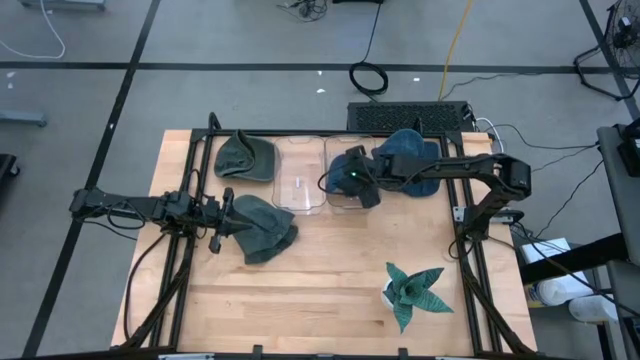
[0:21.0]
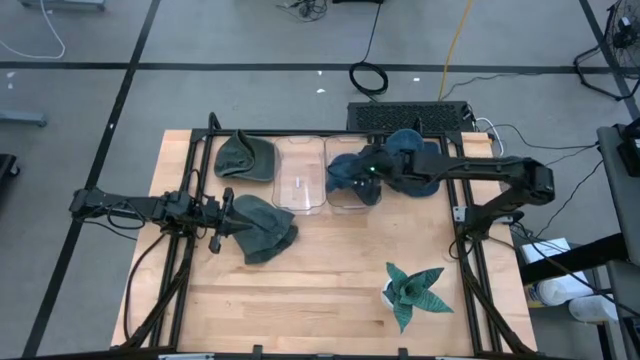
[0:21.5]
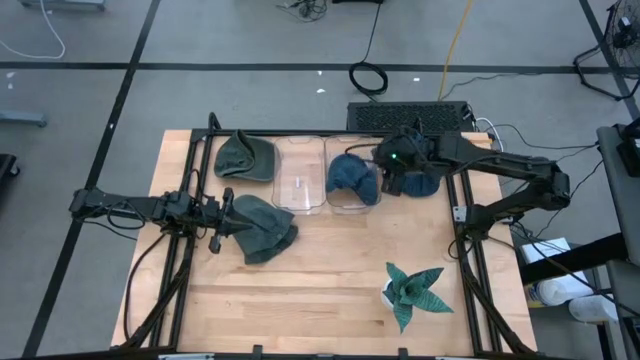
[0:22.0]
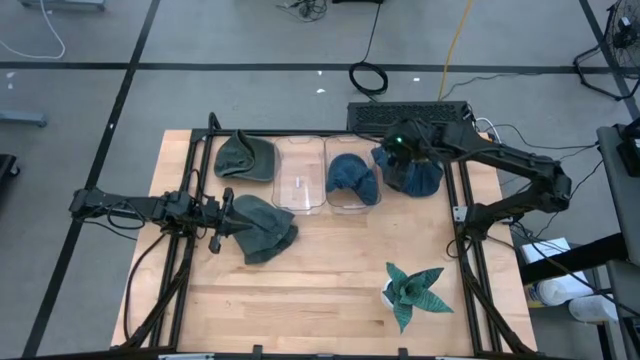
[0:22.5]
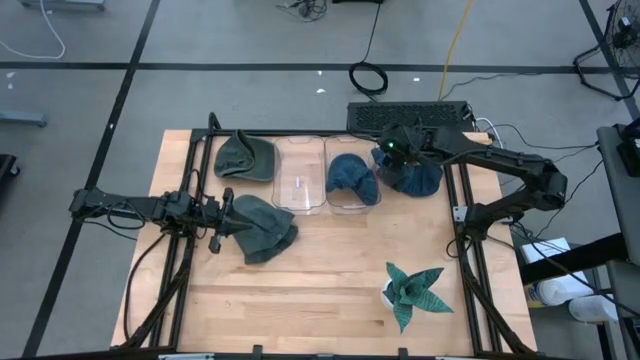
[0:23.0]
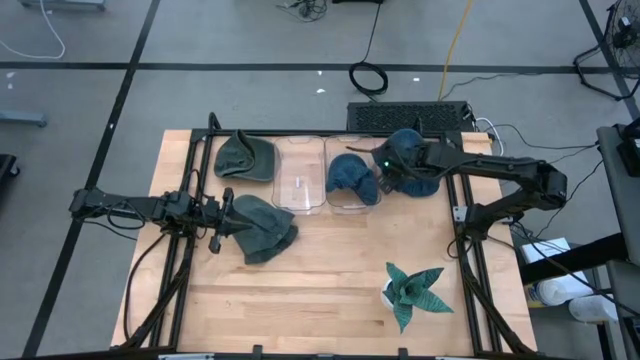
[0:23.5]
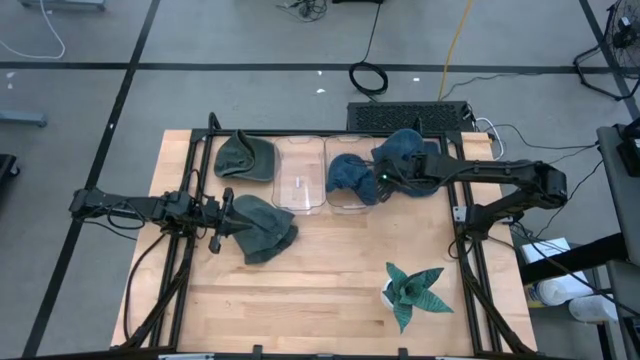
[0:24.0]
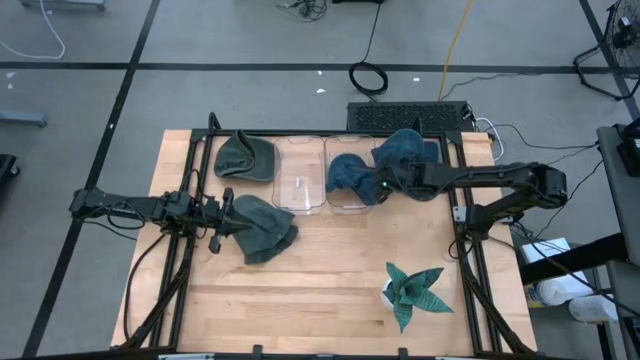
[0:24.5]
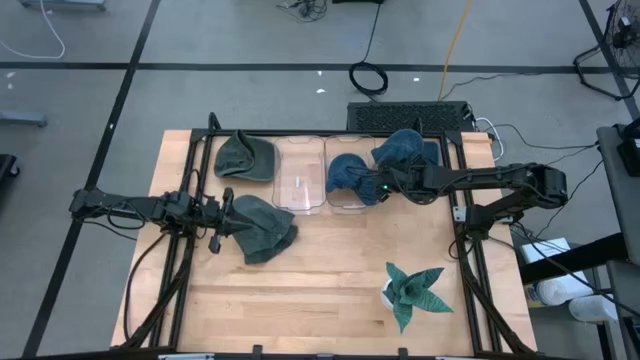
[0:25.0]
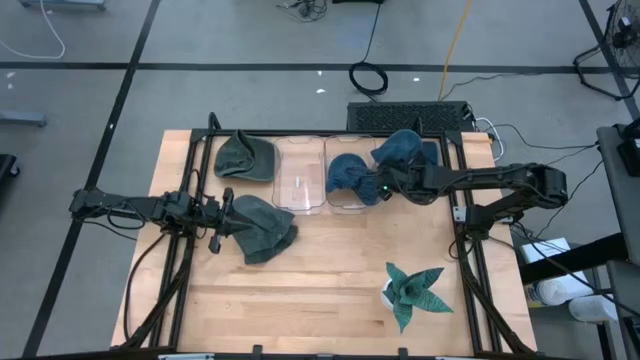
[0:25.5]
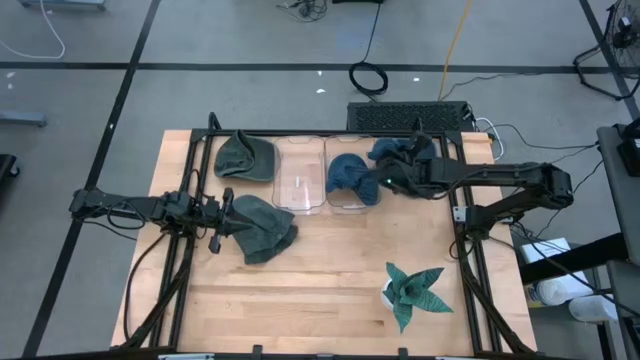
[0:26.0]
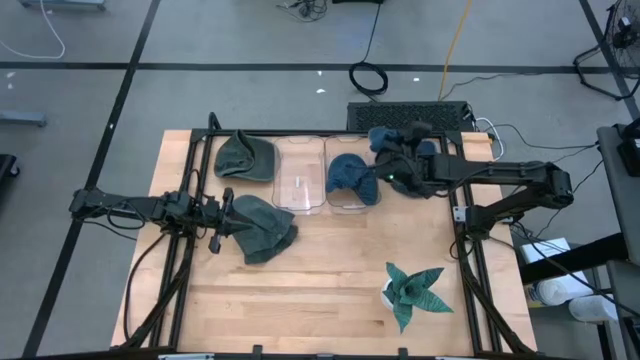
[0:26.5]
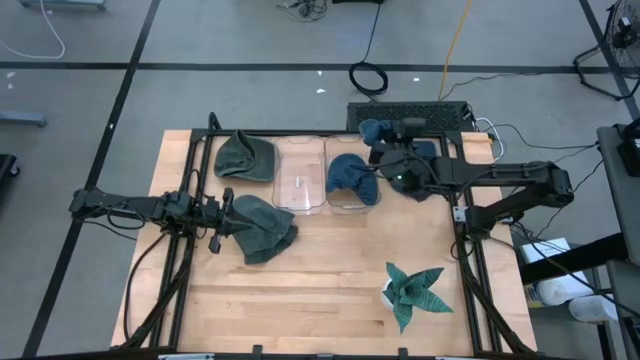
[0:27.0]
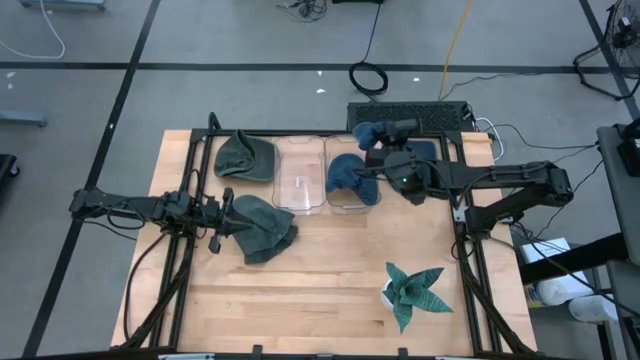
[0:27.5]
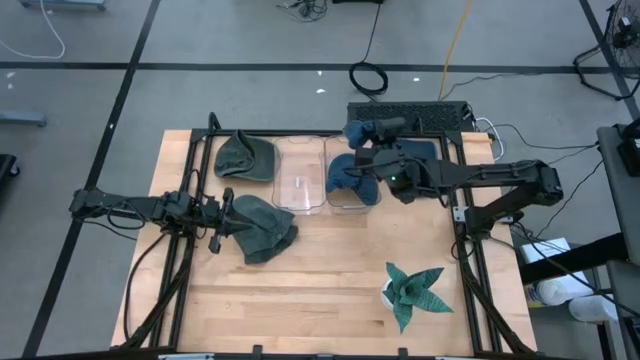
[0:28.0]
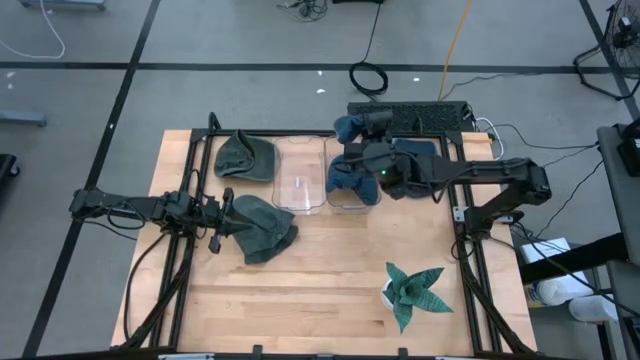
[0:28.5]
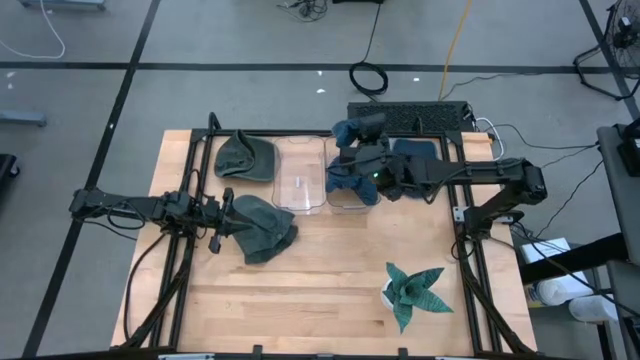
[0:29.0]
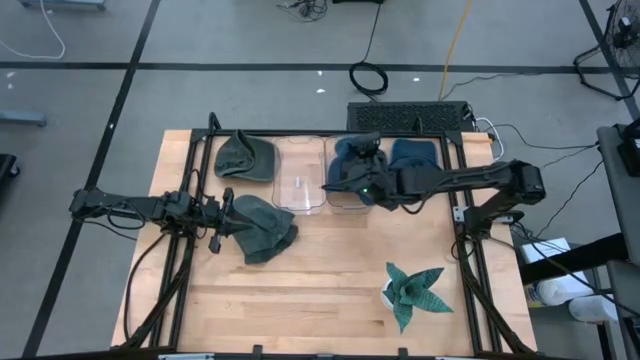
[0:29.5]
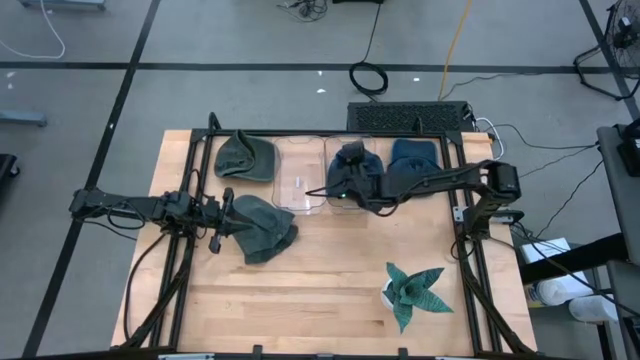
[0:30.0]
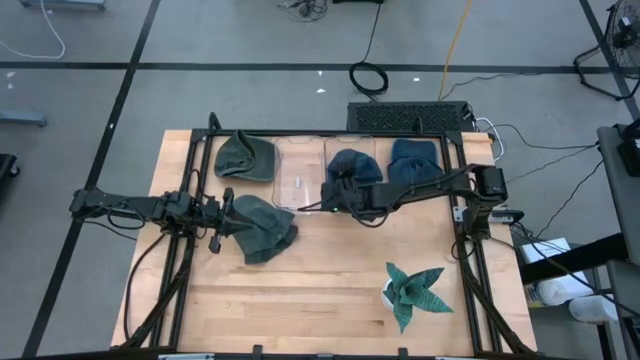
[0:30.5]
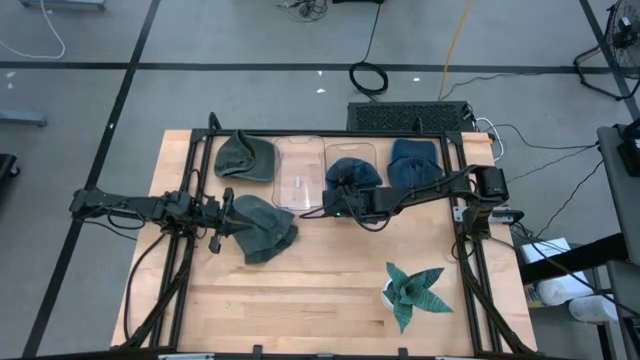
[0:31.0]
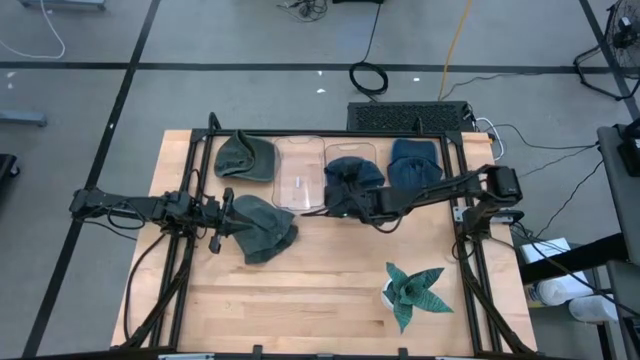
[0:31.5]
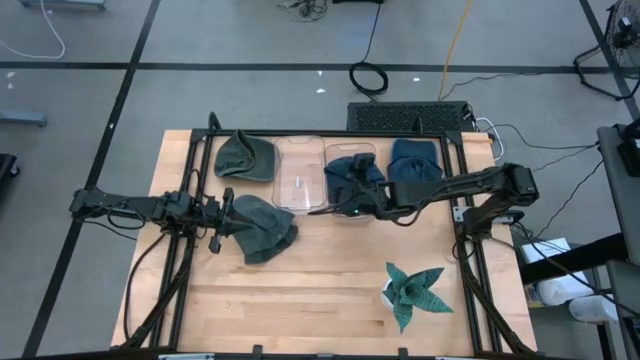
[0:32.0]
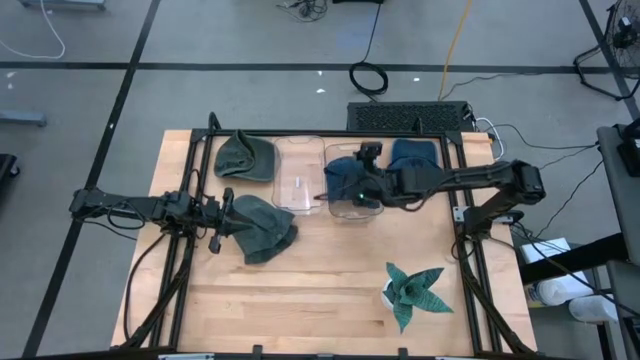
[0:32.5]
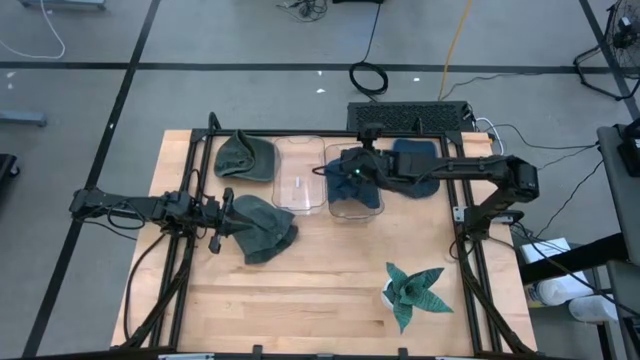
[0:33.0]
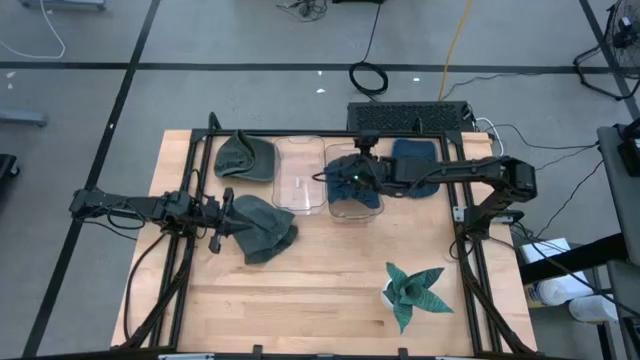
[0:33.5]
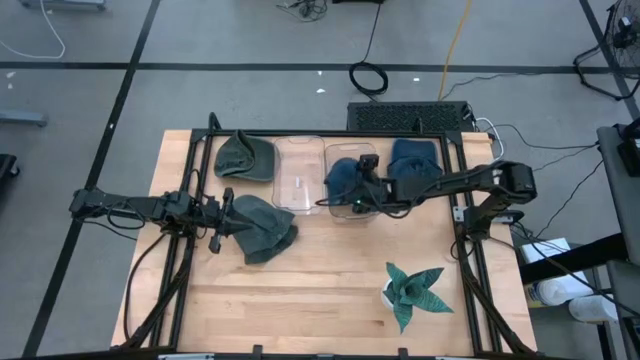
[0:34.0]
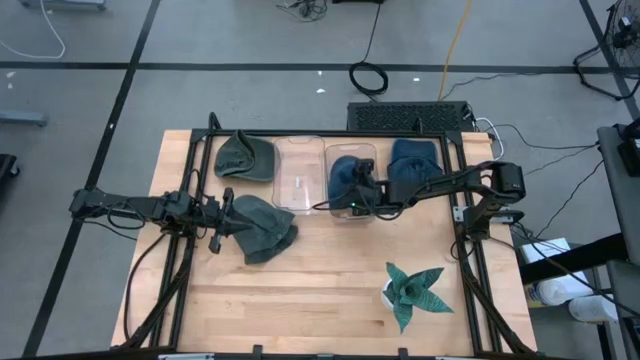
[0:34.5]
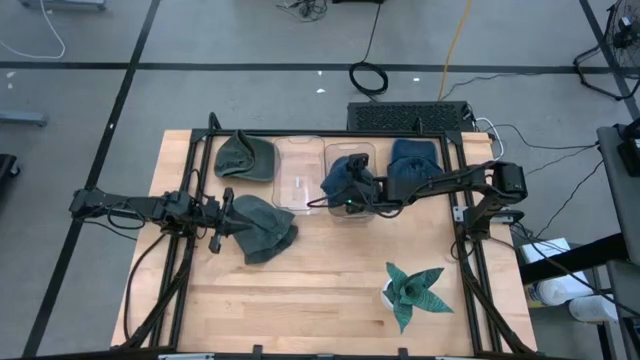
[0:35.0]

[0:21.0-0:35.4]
Task: Pick & Place hat
Put the top blue cap into the right transparent bin
